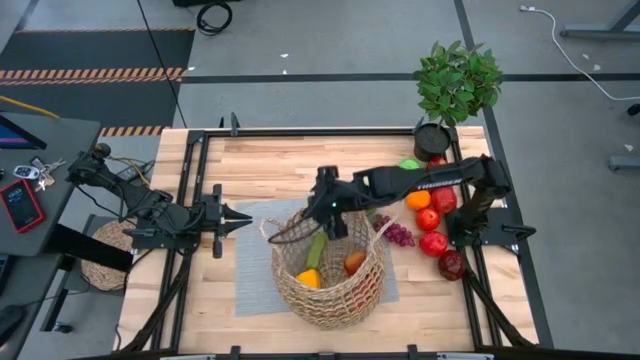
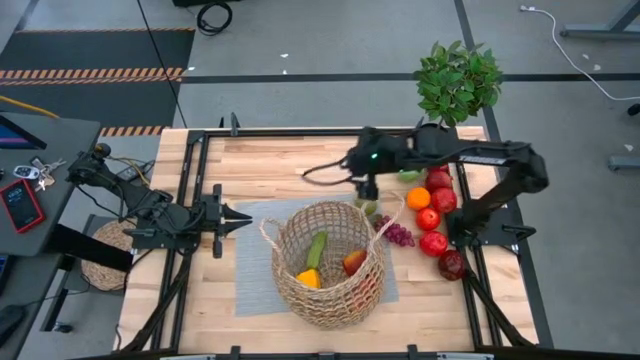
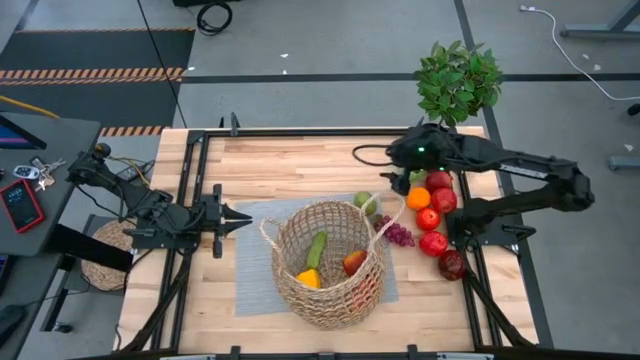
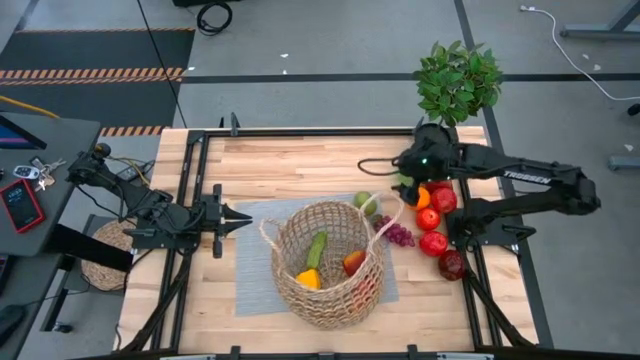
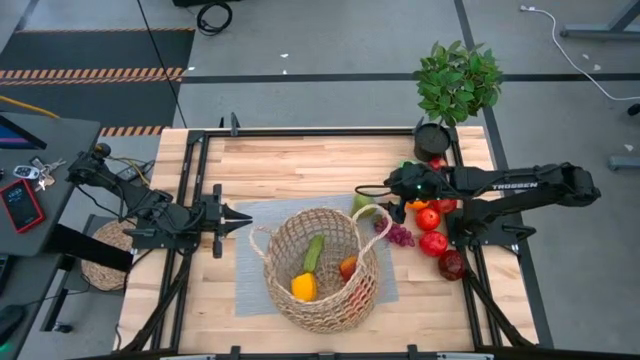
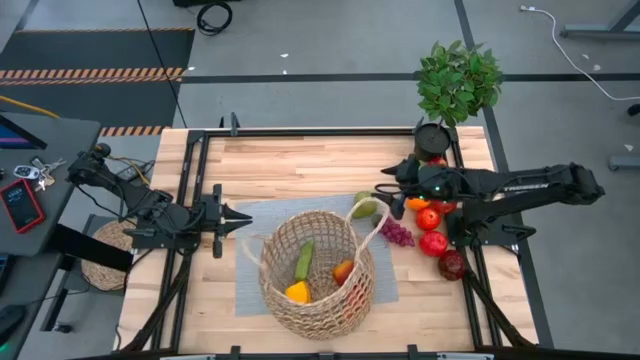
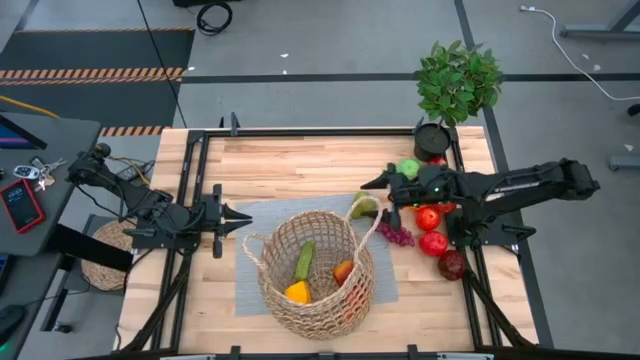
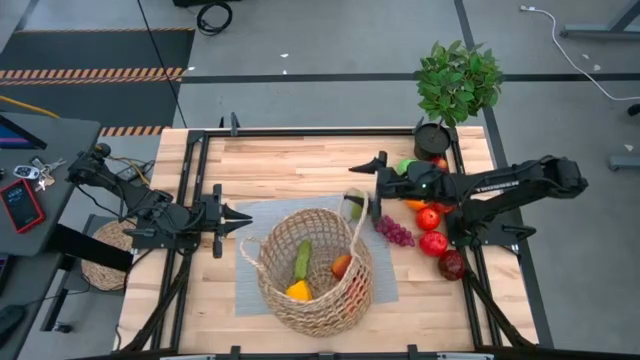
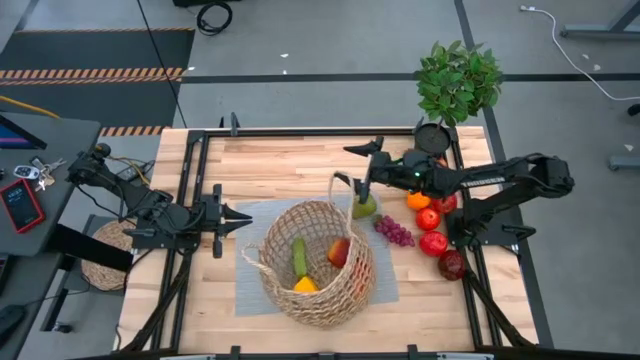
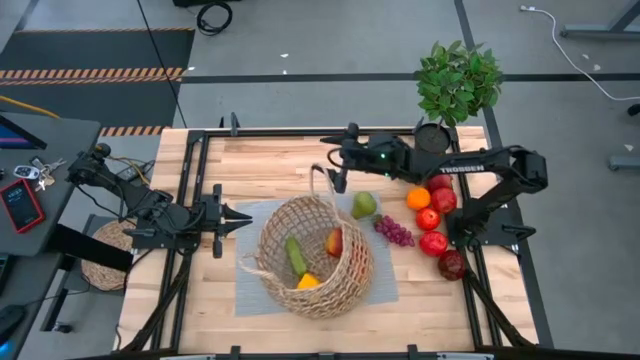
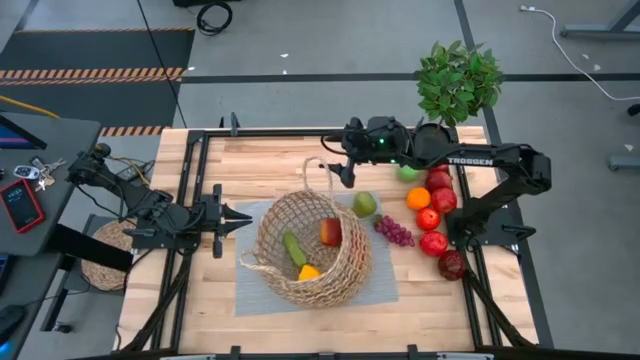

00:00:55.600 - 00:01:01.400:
Task: Build produce basket
Adjust the basket

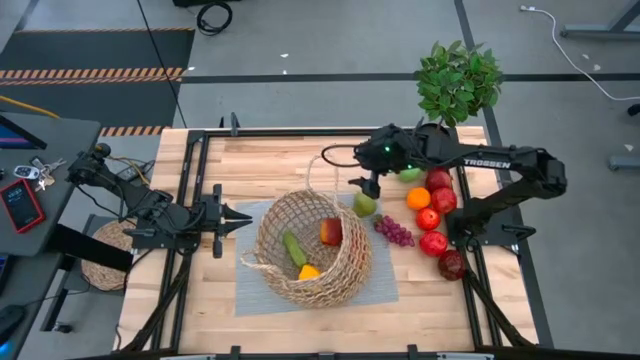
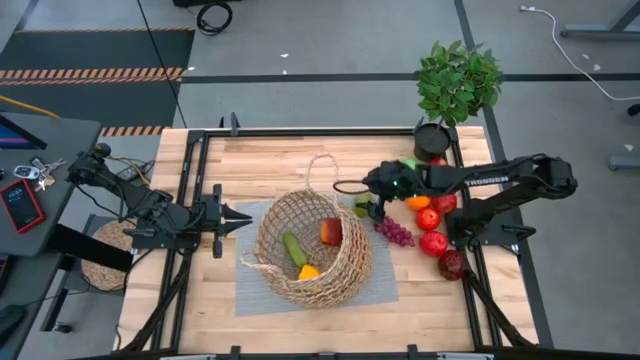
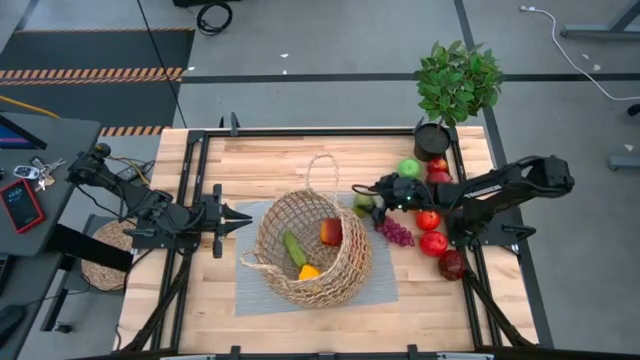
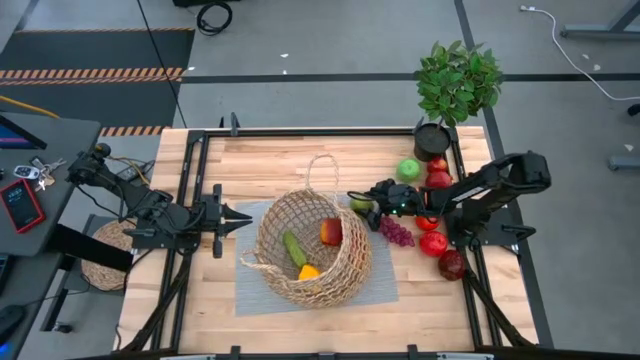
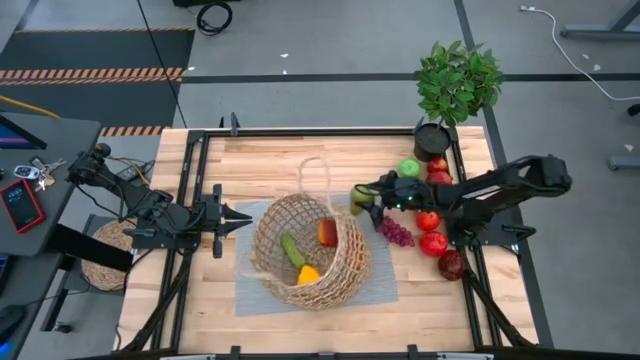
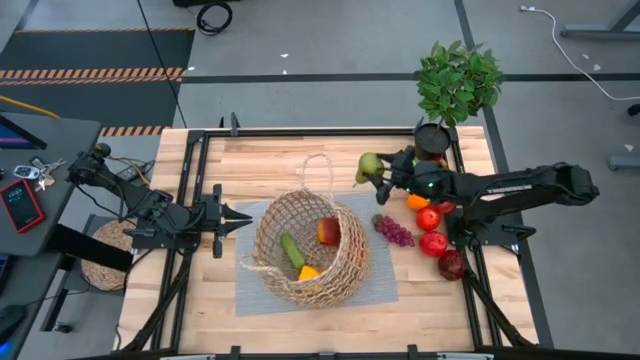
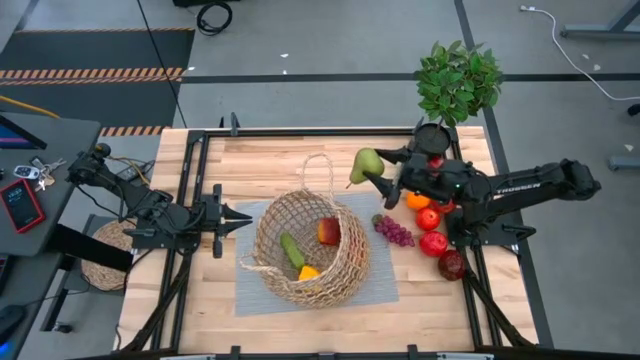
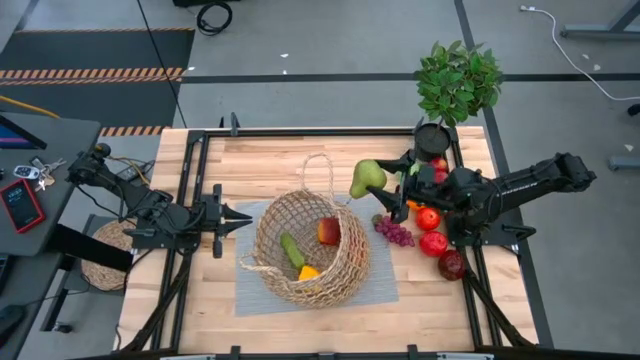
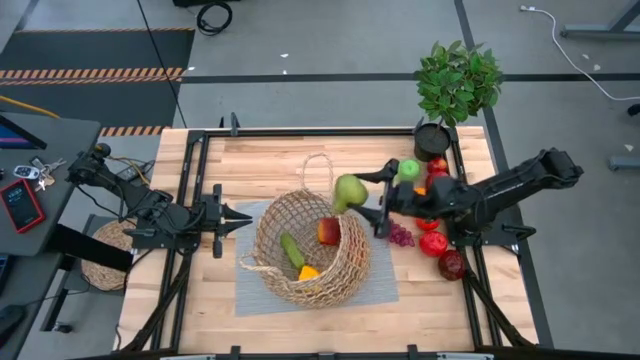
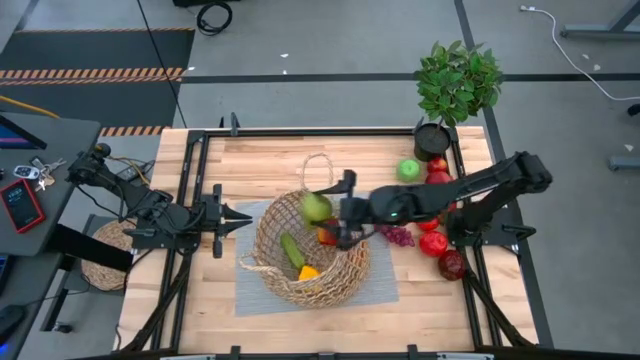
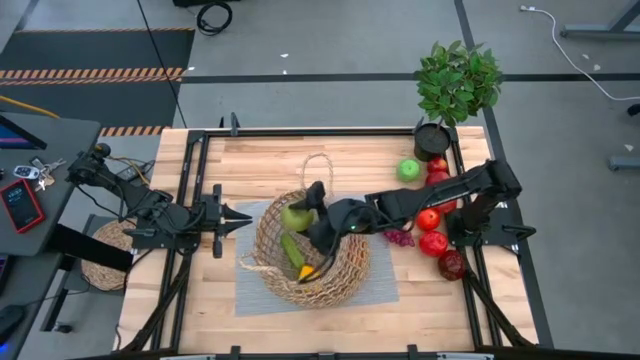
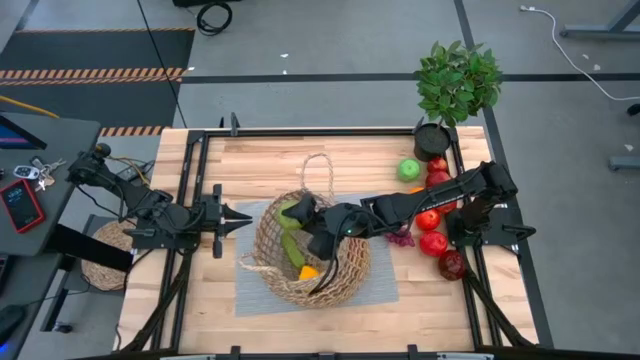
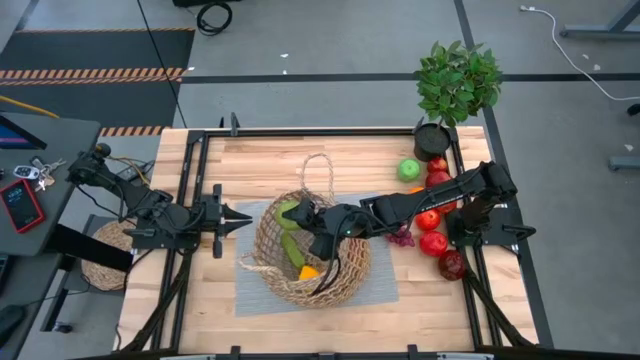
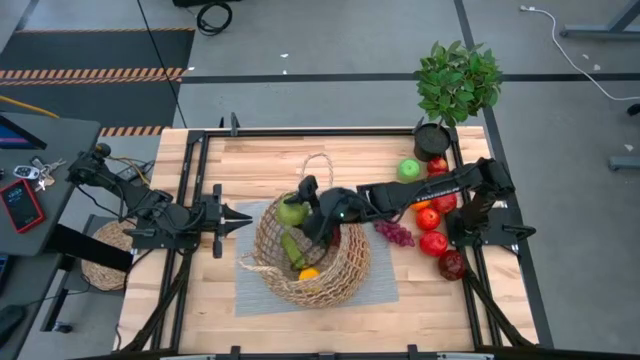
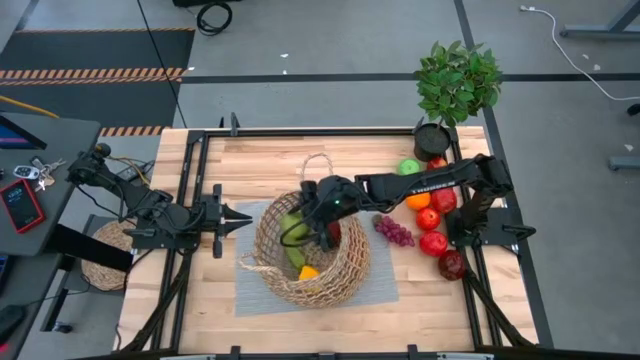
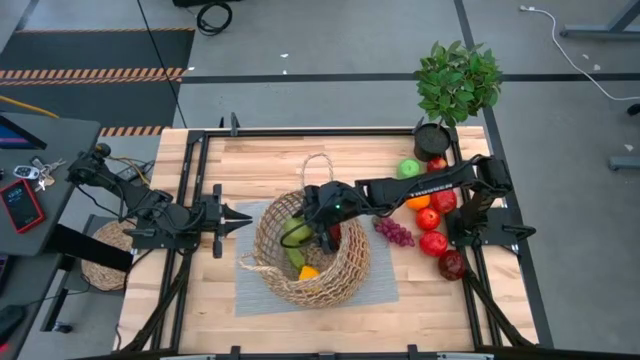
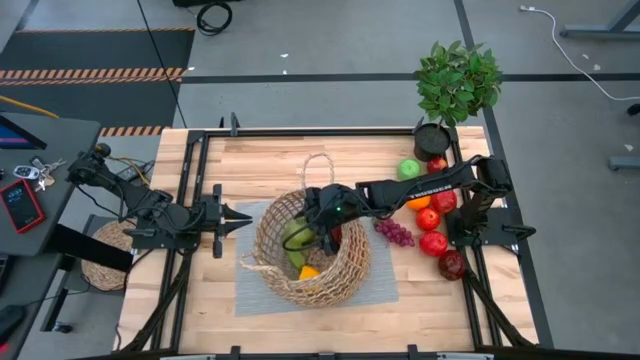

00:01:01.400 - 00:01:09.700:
Put the pear into the basket

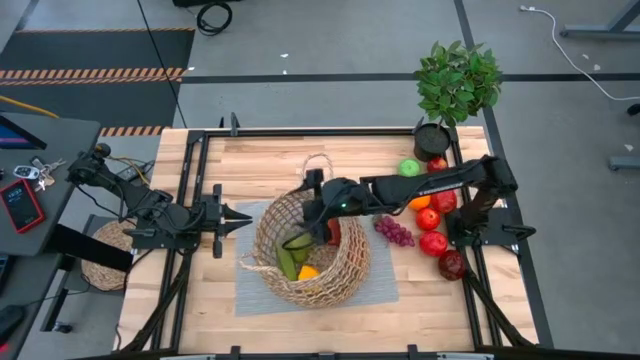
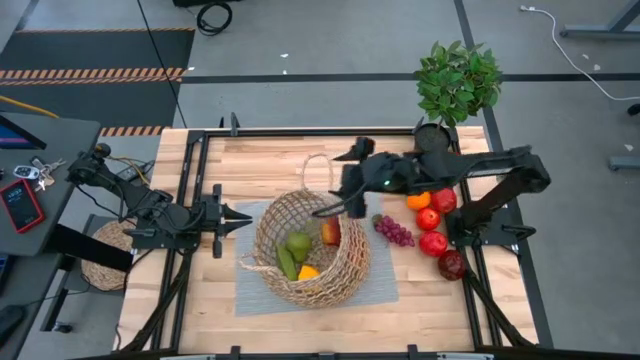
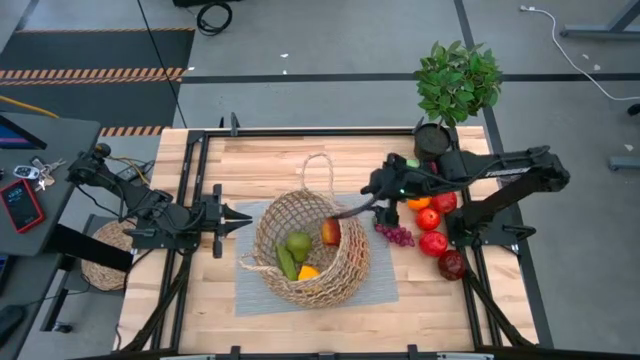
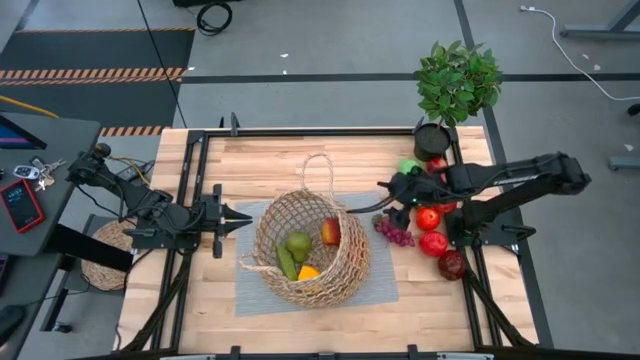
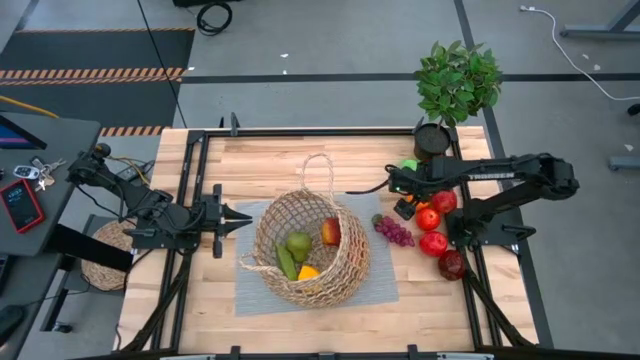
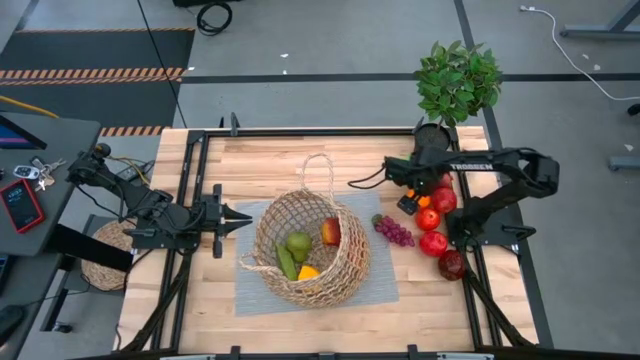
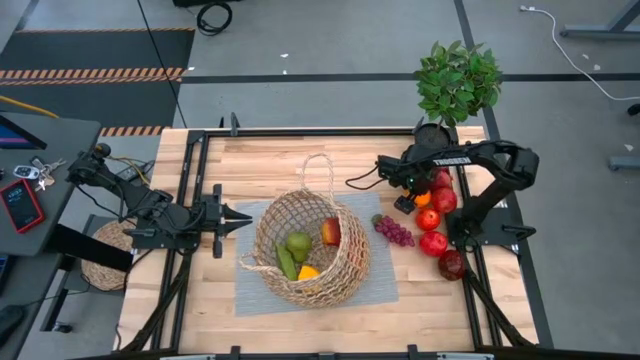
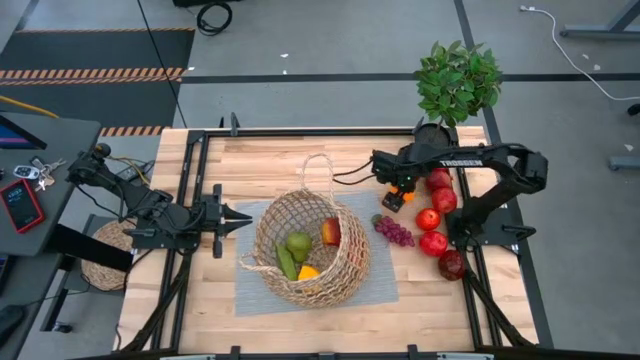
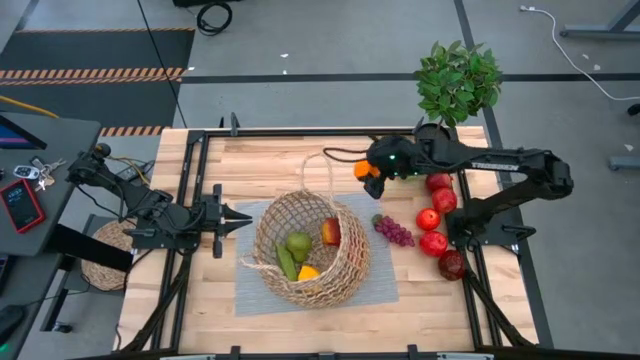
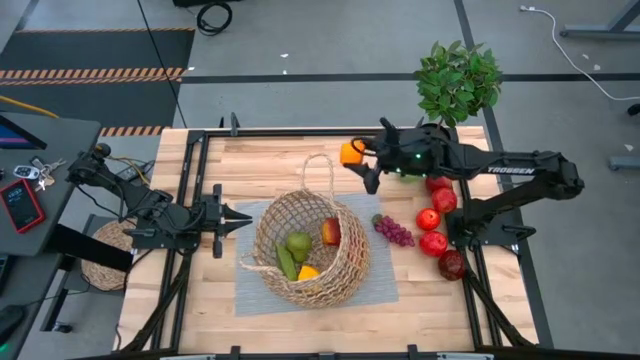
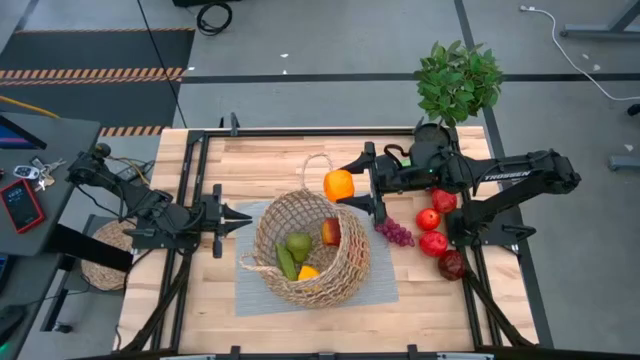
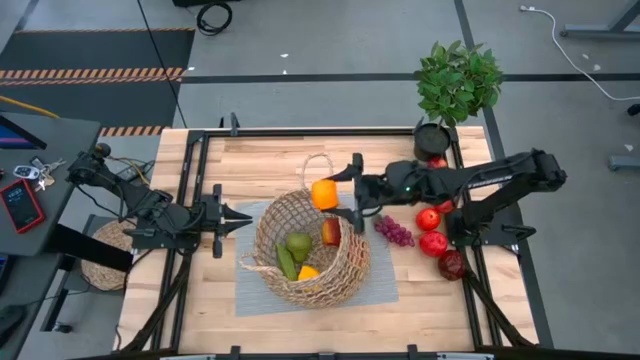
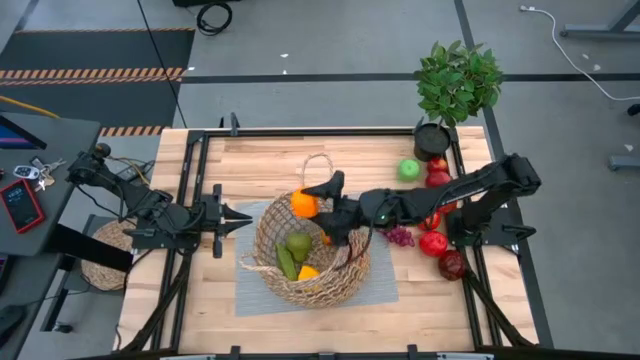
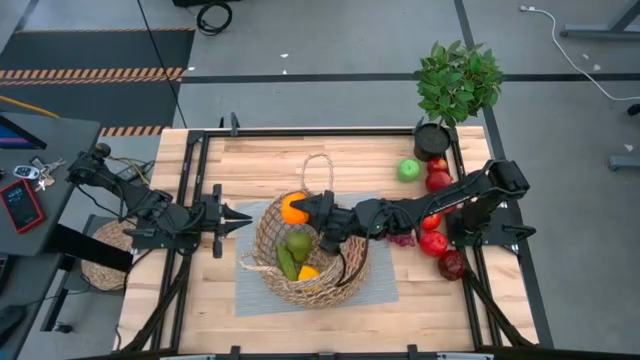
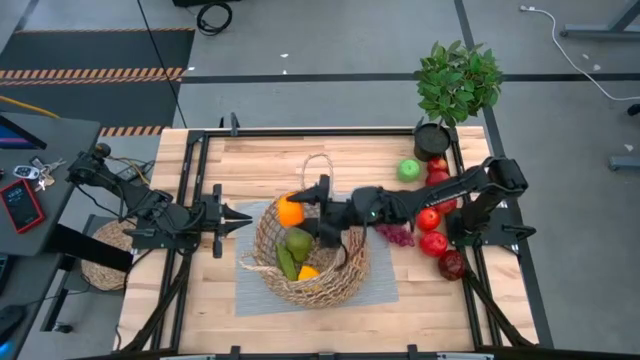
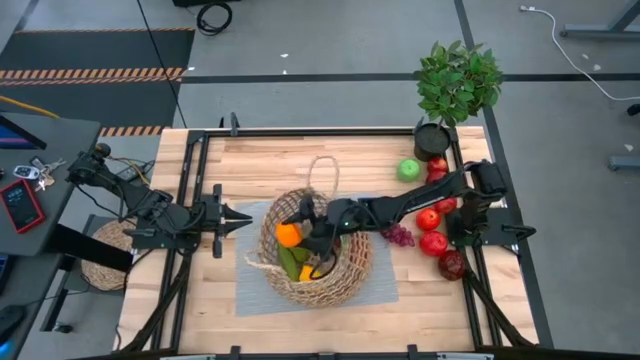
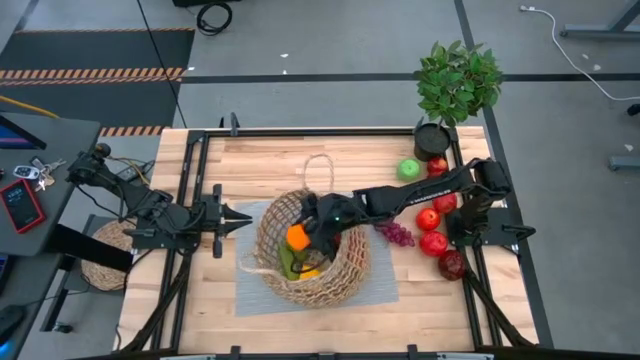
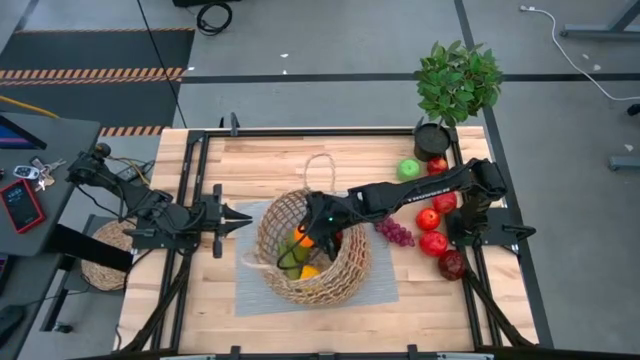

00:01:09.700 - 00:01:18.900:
Put the orange into the basket
